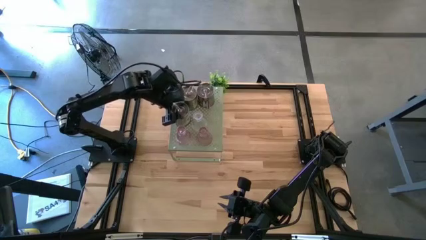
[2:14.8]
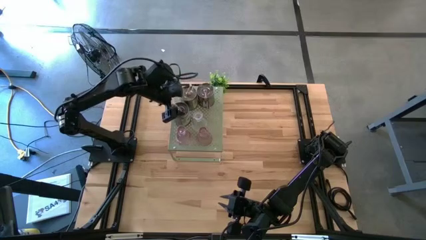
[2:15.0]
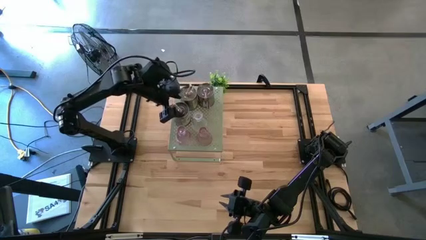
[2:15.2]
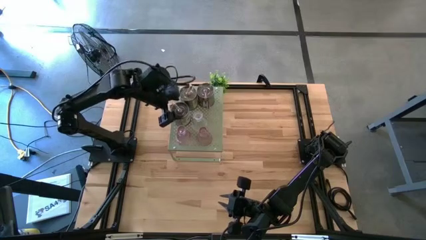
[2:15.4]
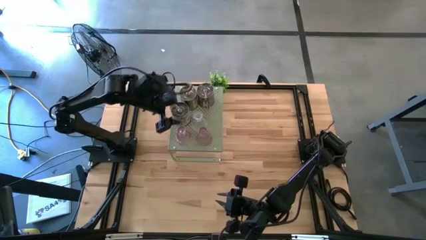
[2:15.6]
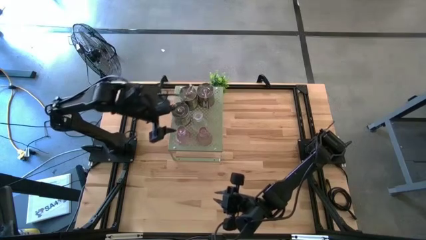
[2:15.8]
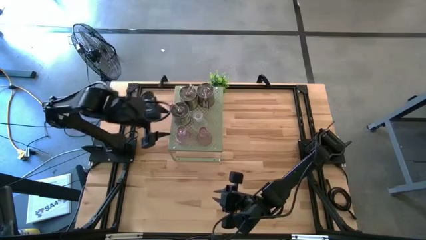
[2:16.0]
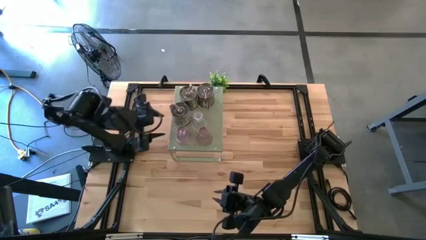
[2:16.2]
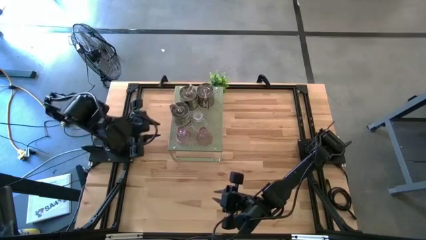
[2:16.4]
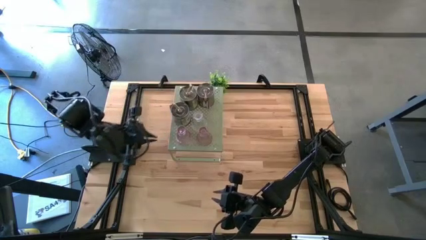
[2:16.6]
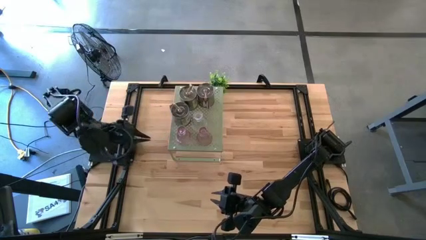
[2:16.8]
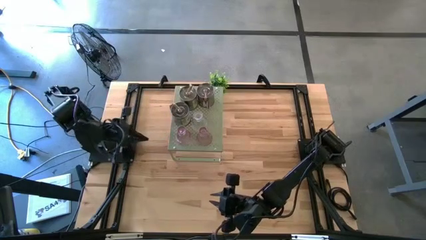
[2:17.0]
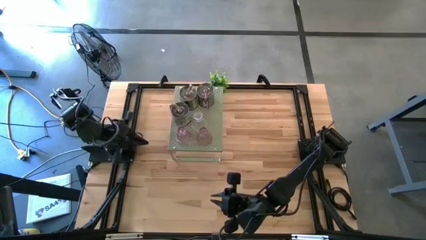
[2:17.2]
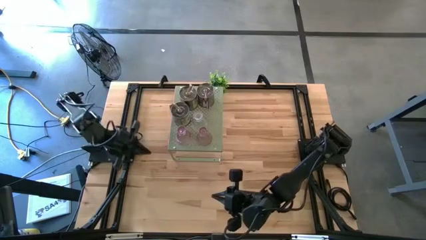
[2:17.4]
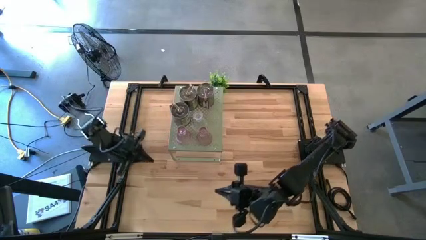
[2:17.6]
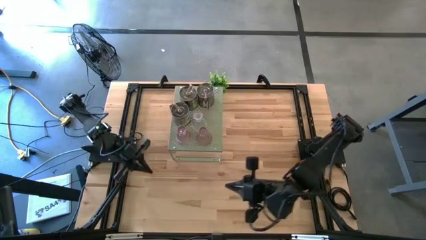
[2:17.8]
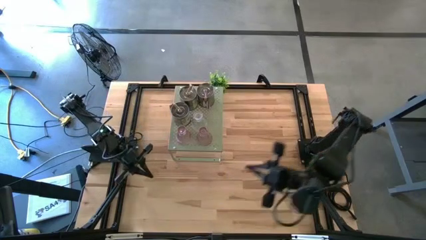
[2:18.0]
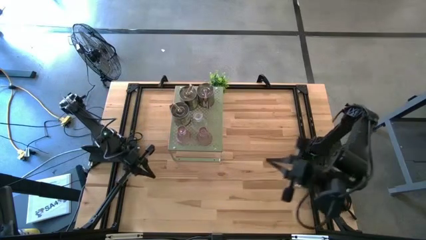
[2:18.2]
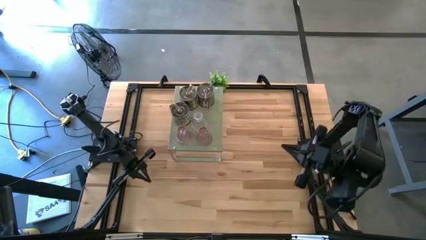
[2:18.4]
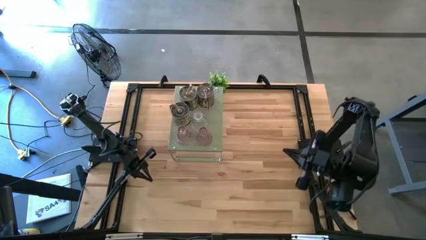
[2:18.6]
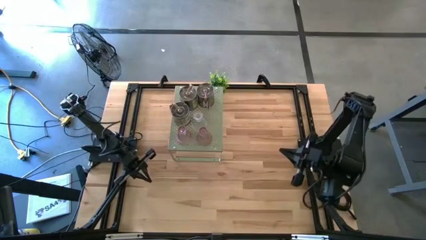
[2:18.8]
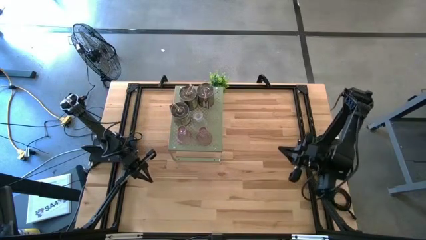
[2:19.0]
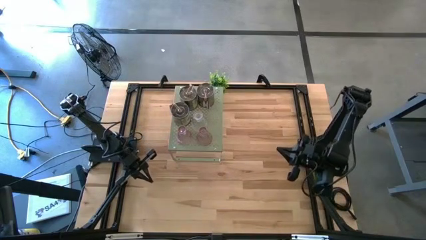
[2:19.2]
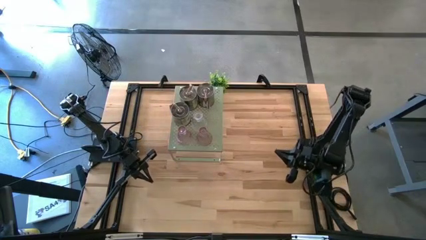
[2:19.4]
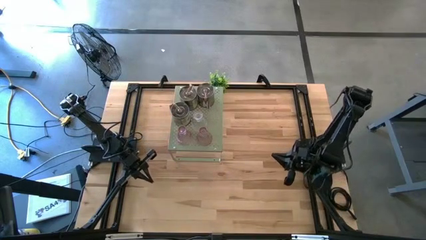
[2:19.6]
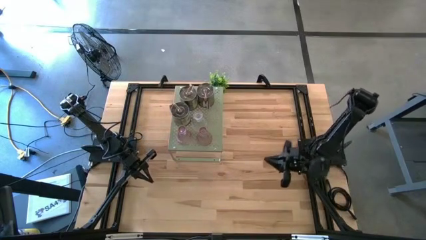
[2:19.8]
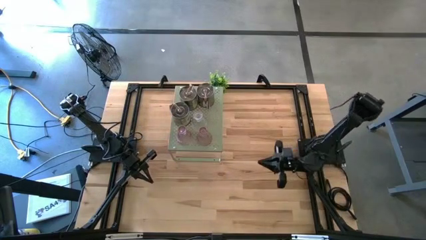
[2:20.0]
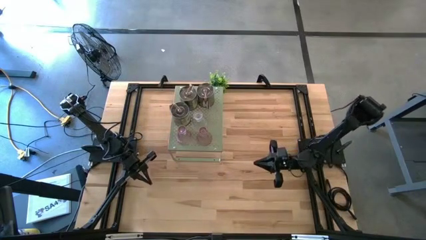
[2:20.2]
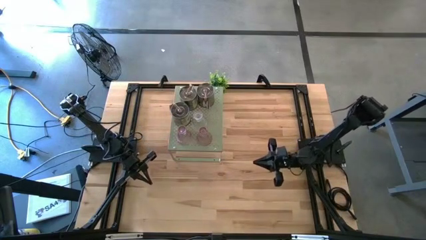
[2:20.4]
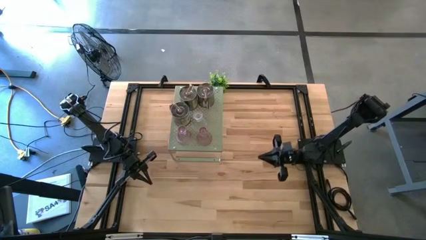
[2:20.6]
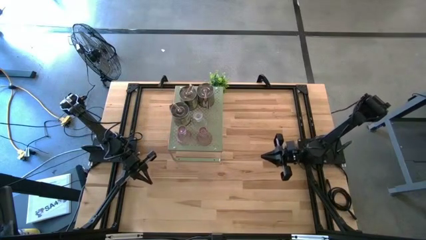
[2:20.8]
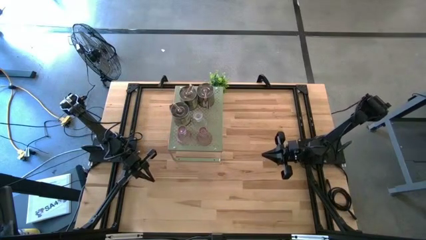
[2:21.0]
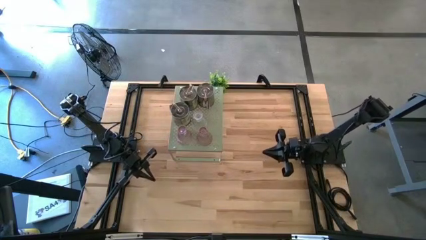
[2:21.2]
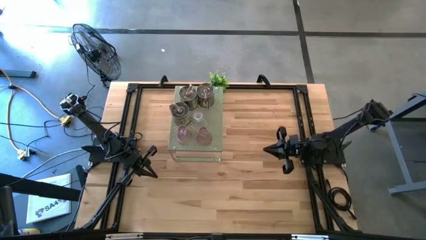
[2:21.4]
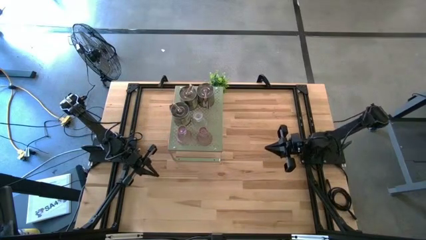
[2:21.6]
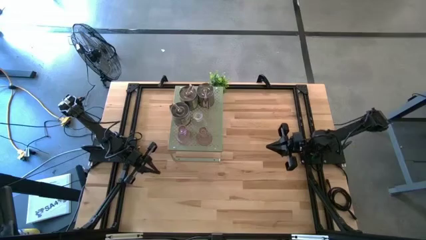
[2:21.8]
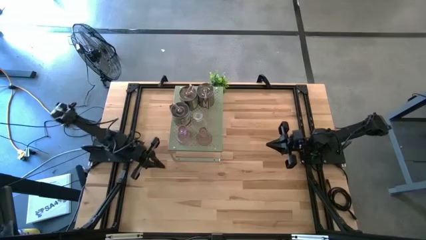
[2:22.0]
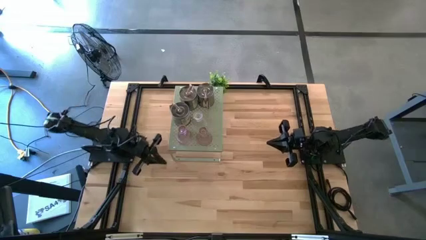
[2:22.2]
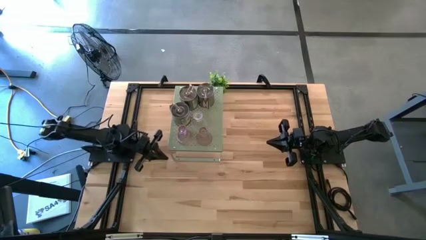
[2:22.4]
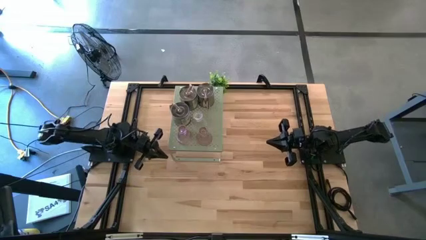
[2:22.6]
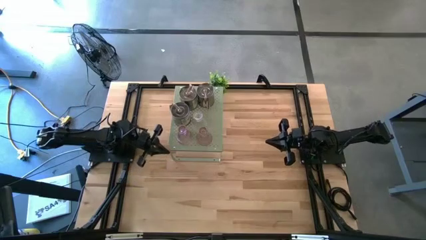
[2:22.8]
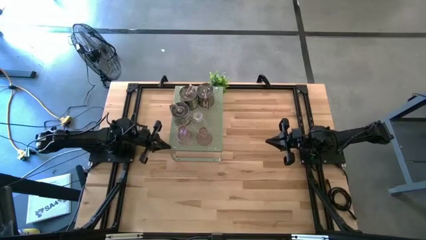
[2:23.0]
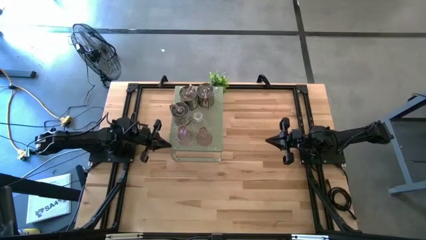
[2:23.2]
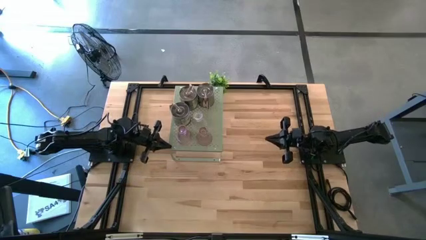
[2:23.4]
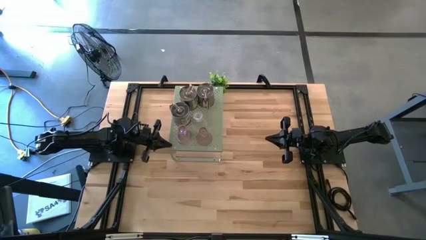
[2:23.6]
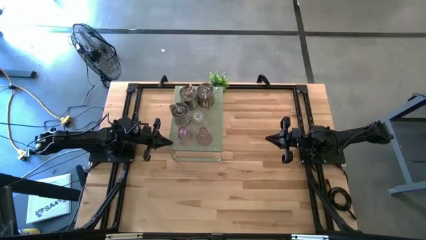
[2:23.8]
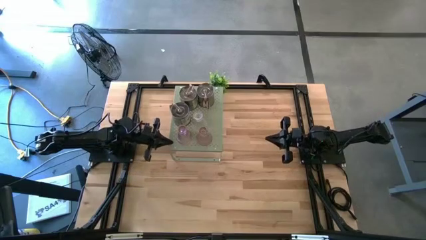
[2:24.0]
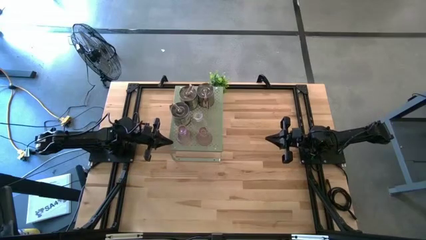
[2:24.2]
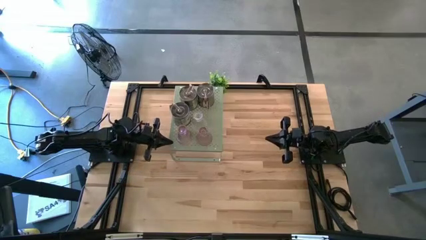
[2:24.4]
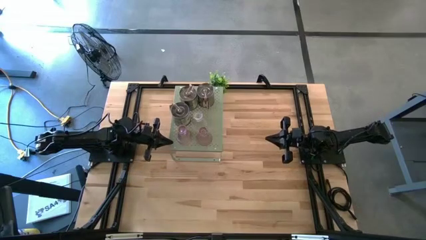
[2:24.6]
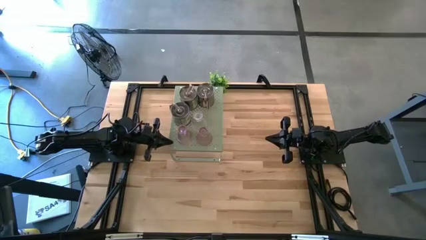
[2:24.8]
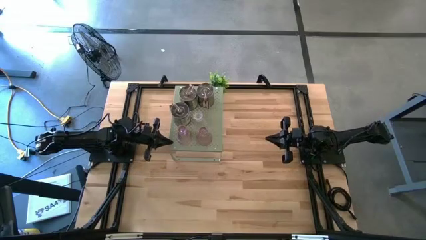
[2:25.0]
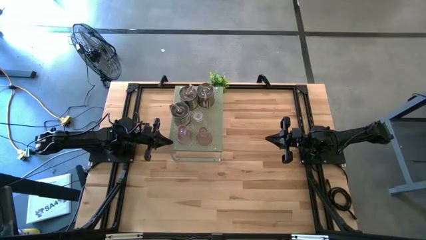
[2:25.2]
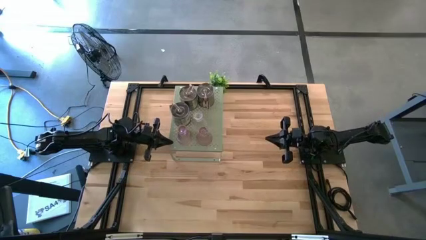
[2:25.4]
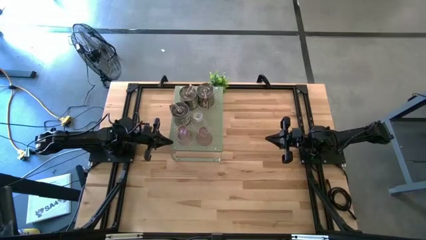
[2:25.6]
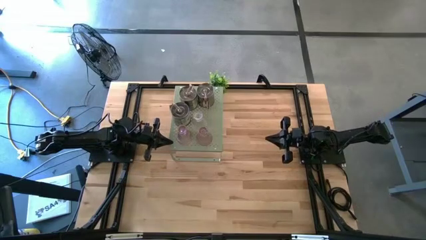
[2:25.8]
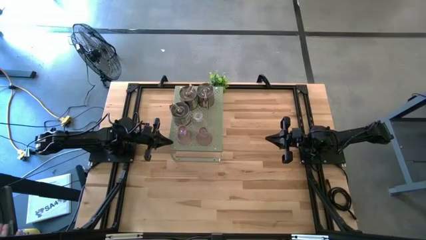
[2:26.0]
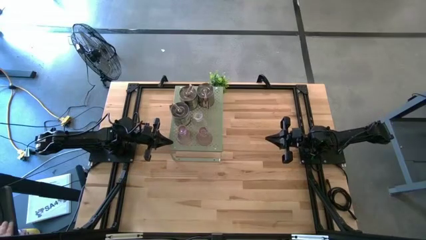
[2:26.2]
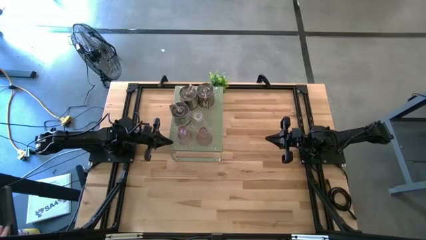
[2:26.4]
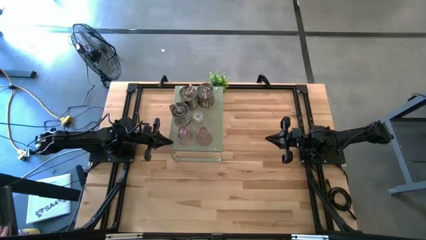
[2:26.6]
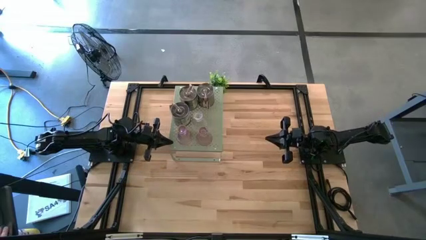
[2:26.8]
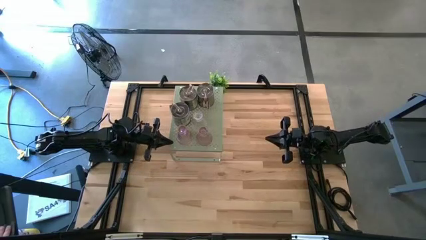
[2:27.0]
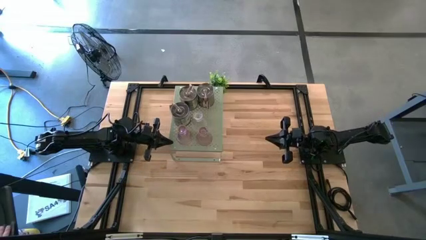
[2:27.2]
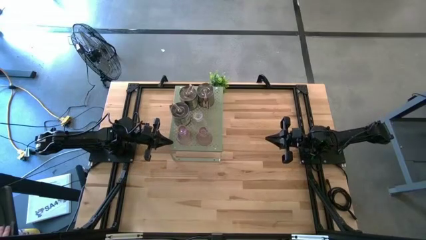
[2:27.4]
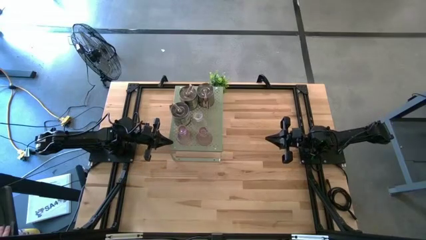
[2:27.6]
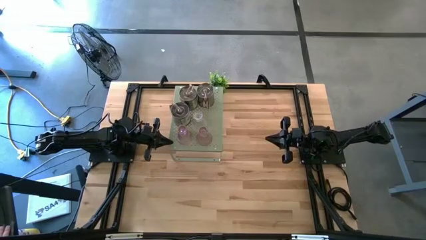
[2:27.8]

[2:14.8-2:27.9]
Task: Pick & Place candle stick holders
Return to Home Position

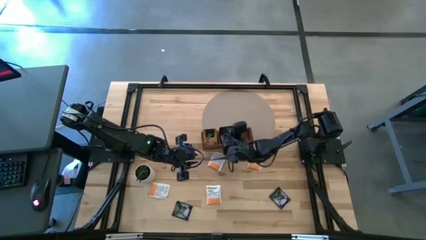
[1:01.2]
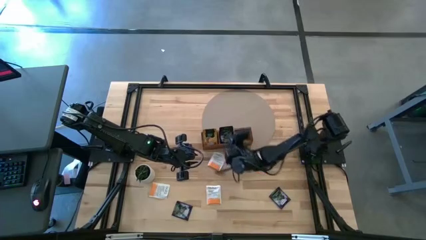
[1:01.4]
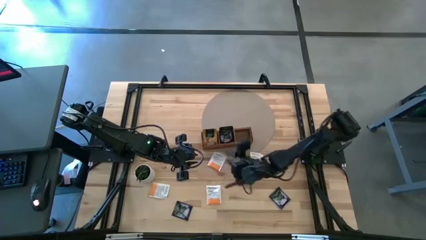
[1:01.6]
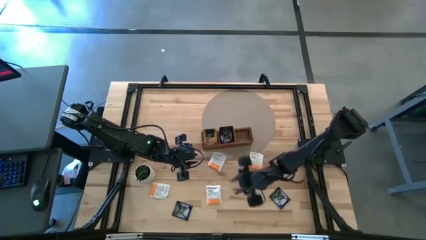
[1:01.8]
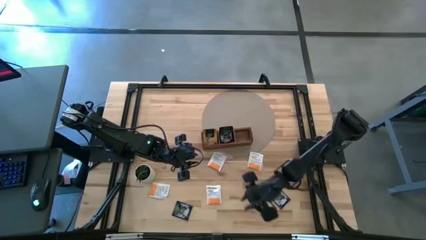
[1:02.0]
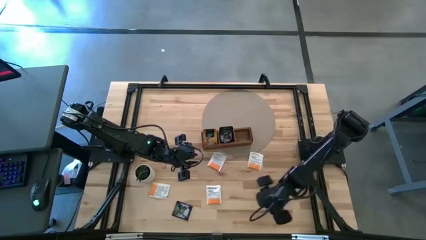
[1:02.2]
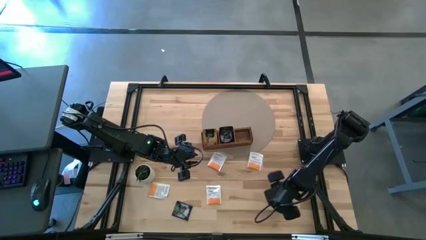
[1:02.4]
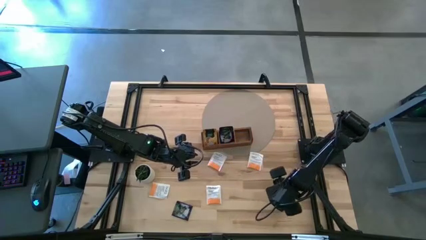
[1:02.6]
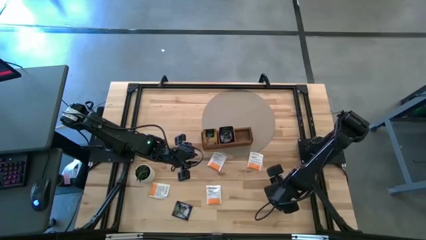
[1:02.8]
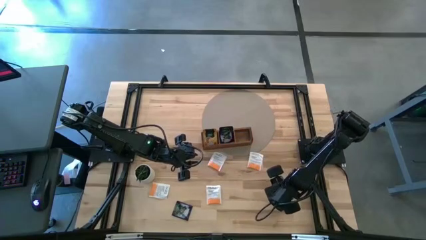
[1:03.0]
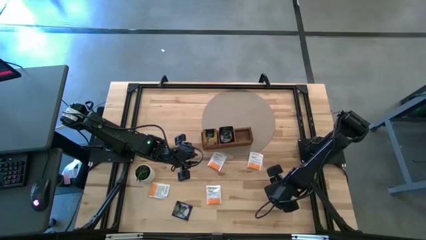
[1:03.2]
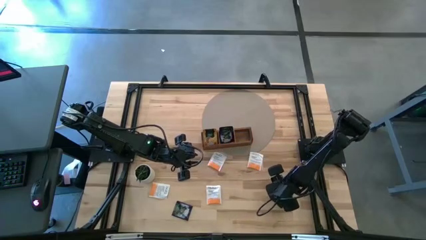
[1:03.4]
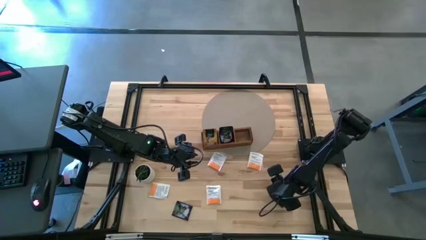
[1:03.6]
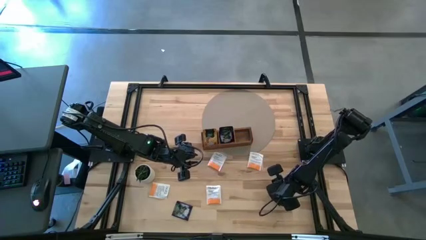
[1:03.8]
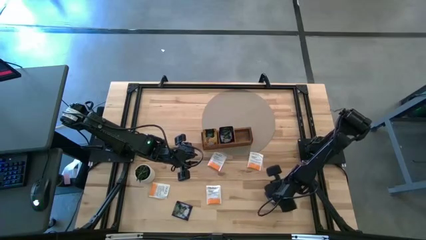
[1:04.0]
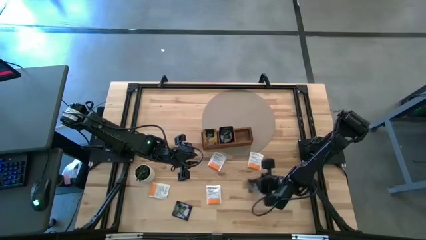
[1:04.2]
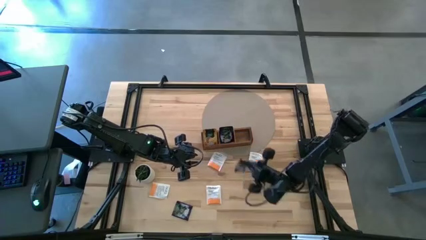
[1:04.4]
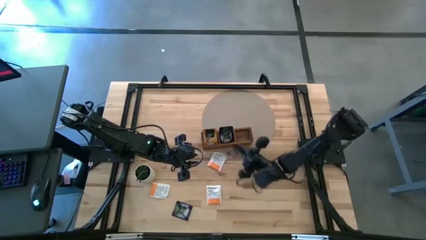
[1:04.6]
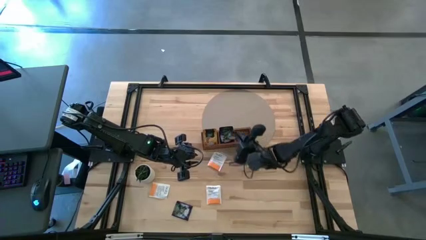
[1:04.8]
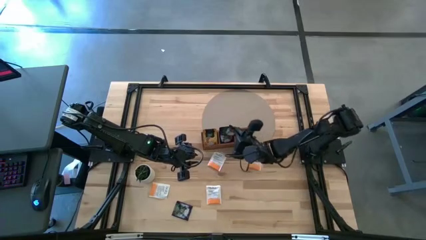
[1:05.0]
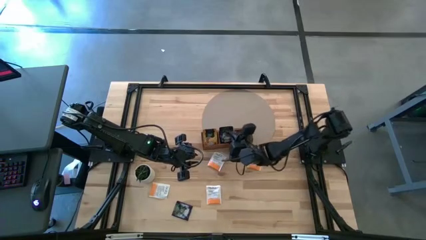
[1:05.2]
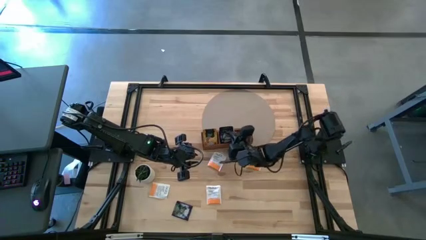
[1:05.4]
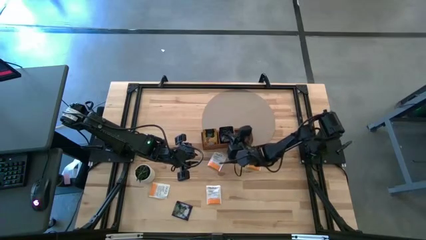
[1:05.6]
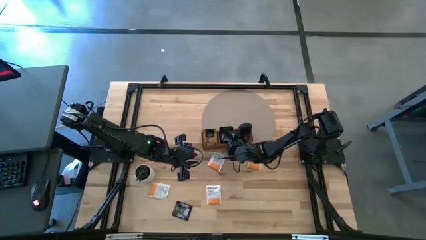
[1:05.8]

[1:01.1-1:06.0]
Task: Pick & Place Tea
Put the violet tea bag into the middle section of the wooden organizer
